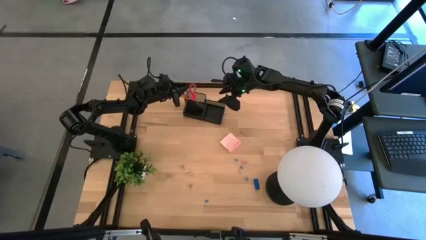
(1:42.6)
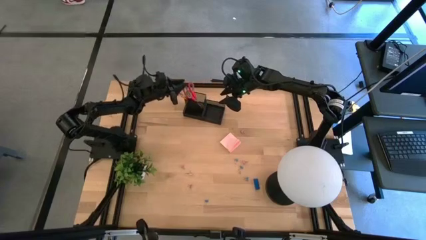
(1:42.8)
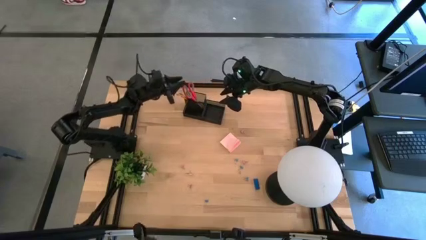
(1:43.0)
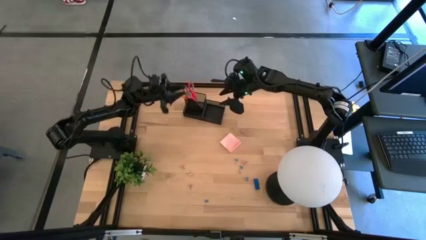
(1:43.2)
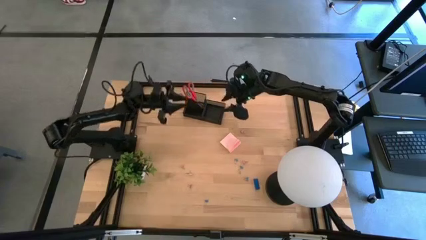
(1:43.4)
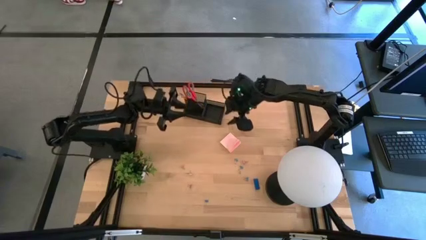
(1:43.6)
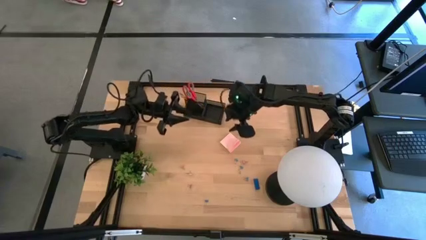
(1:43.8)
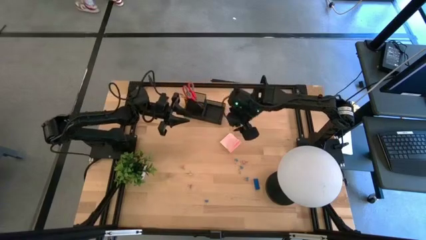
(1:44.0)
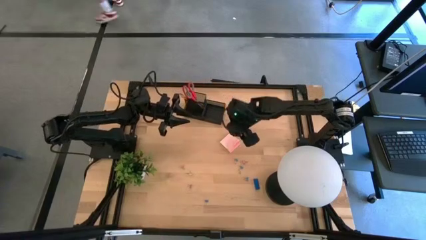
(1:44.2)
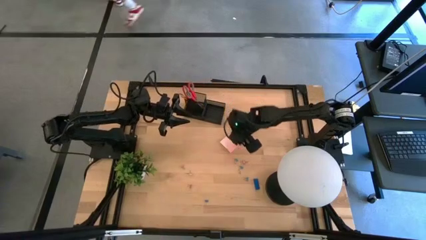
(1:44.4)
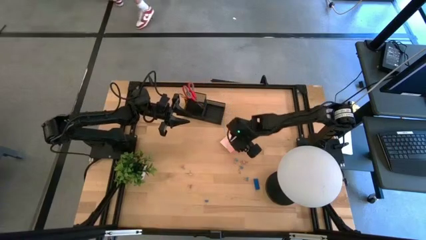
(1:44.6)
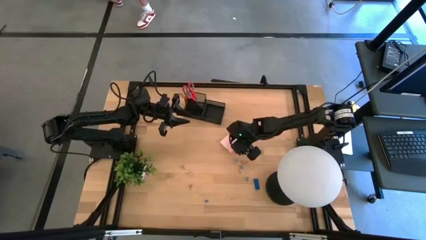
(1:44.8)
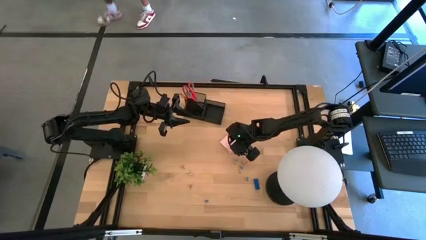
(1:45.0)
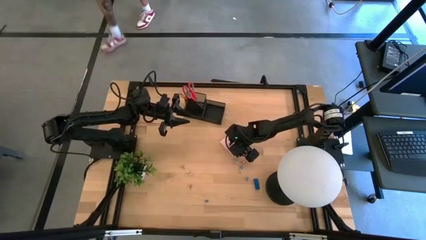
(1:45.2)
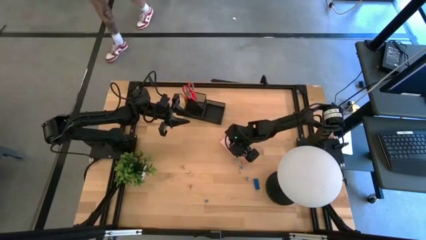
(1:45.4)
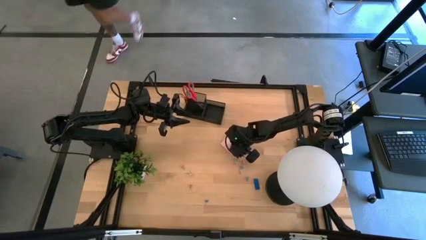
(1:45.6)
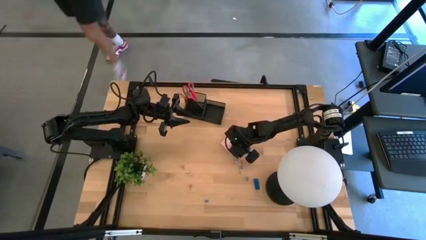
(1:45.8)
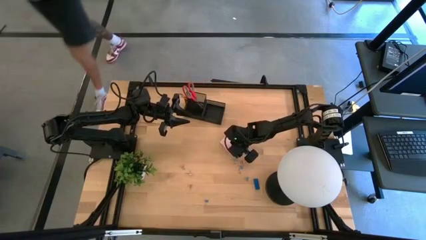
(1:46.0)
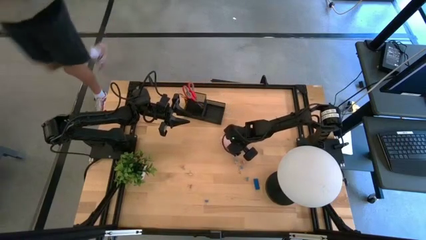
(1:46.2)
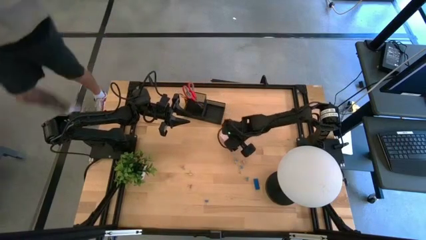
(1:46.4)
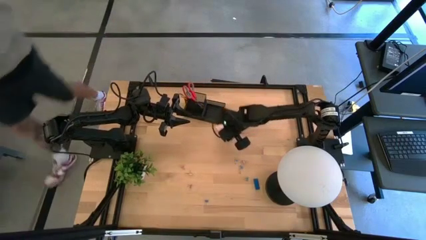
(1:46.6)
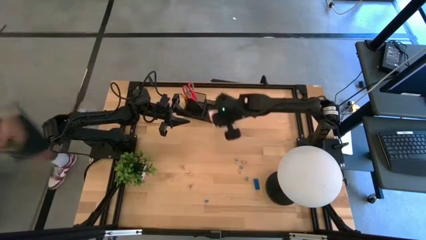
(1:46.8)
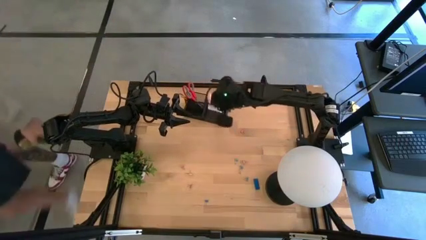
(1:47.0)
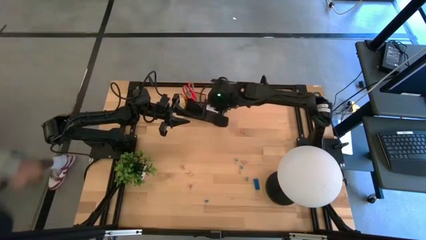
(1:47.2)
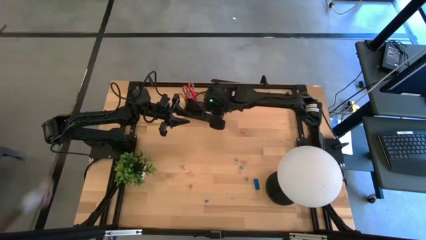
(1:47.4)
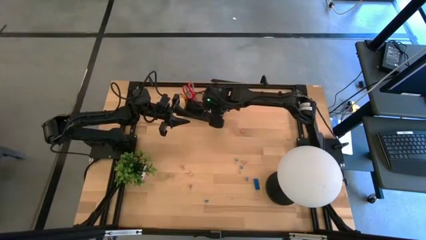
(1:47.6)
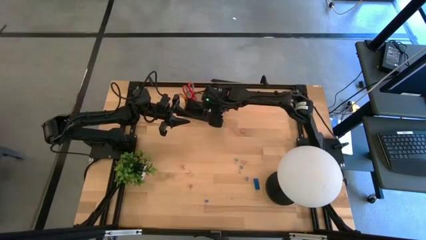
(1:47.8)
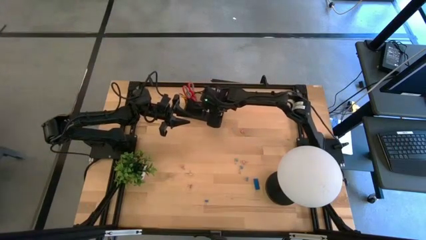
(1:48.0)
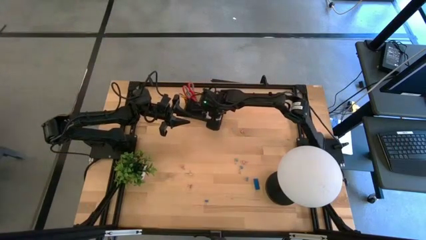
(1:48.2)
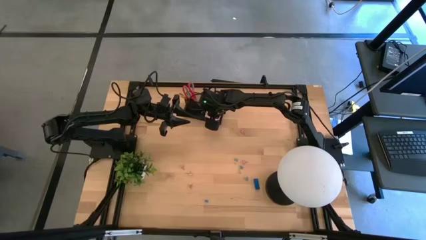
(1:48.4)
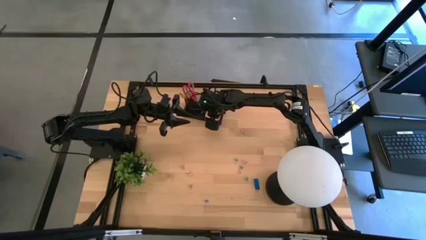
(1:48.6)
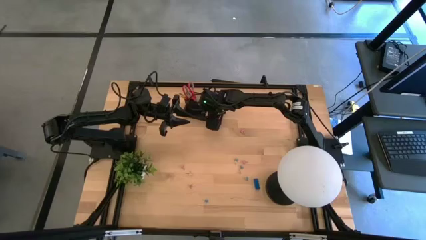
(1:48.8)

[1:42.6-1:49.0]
Task: Pick and place office supplies into organizer
Put the pink sticky notes into the black desk organizer

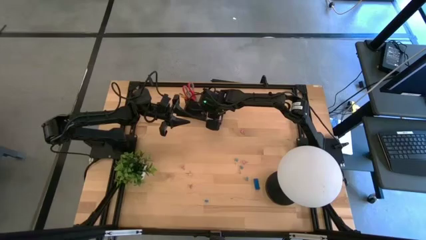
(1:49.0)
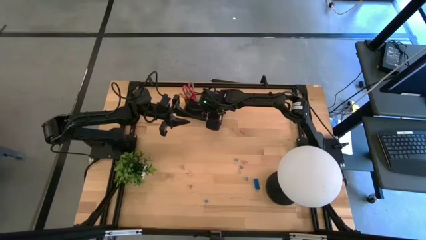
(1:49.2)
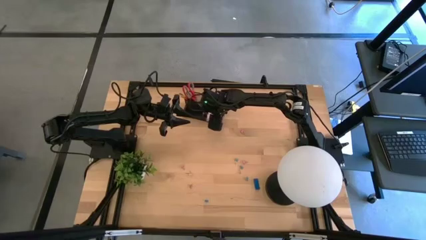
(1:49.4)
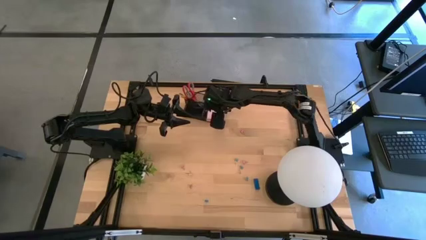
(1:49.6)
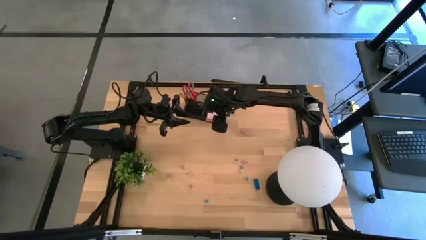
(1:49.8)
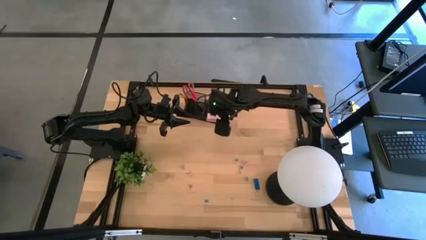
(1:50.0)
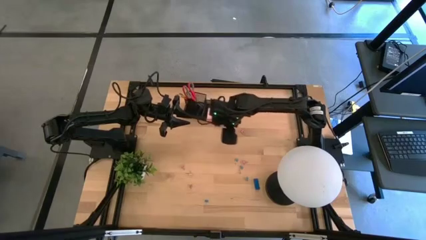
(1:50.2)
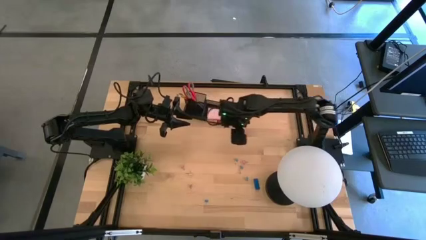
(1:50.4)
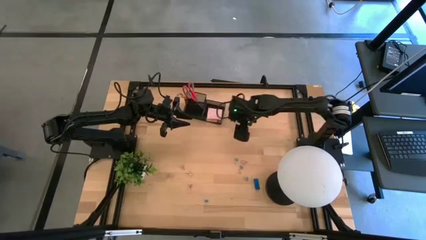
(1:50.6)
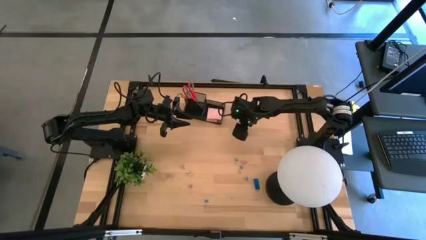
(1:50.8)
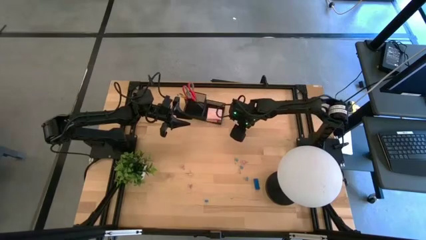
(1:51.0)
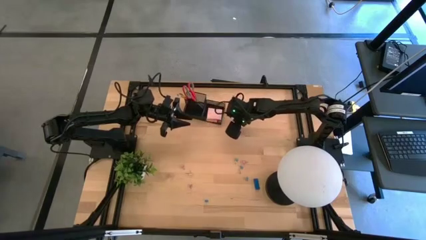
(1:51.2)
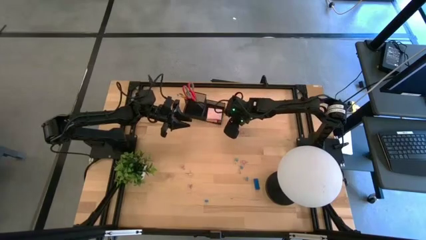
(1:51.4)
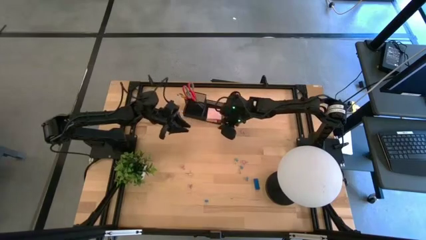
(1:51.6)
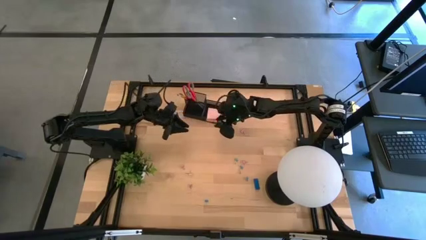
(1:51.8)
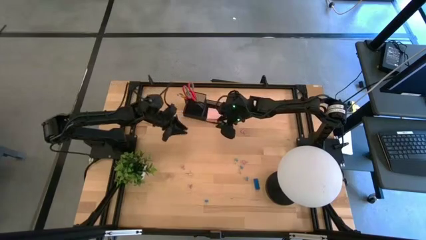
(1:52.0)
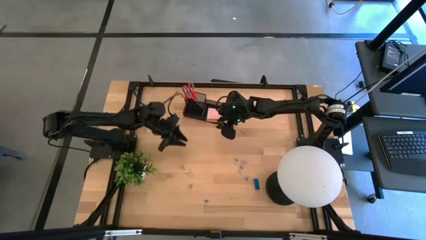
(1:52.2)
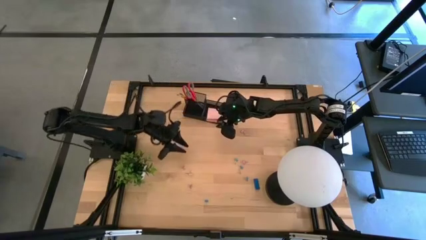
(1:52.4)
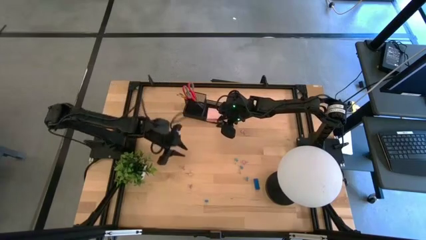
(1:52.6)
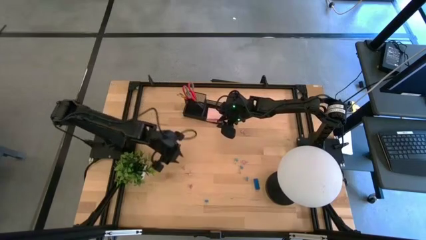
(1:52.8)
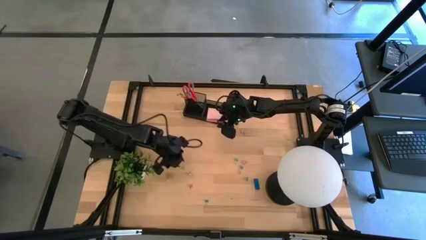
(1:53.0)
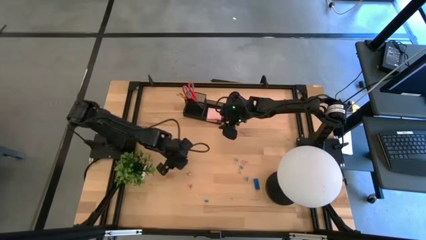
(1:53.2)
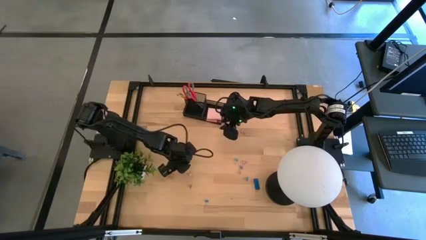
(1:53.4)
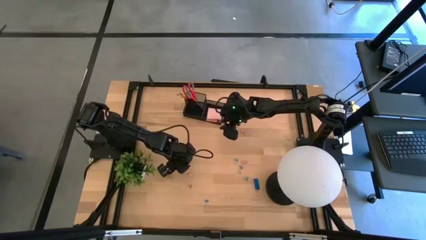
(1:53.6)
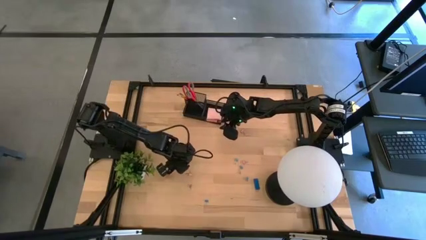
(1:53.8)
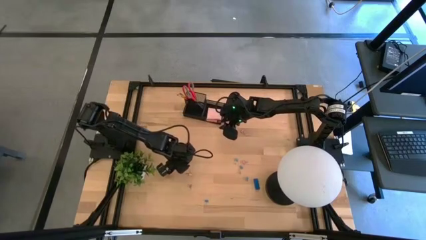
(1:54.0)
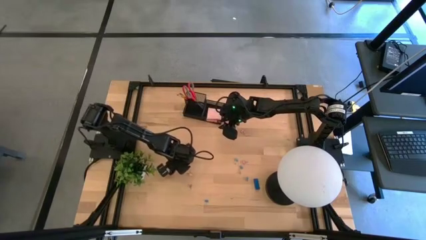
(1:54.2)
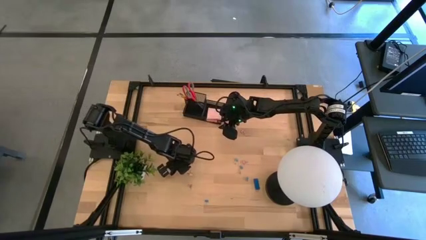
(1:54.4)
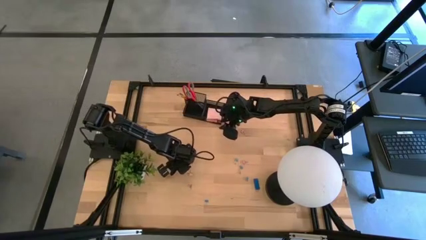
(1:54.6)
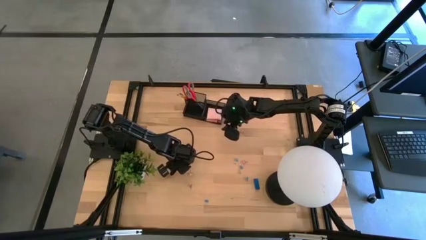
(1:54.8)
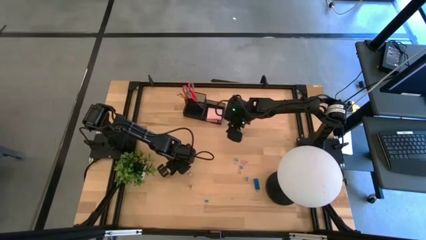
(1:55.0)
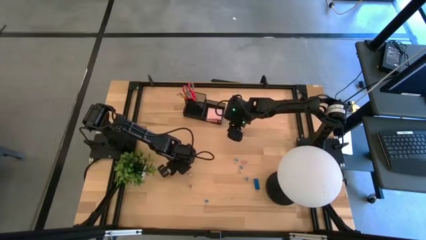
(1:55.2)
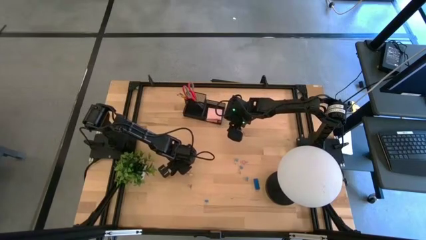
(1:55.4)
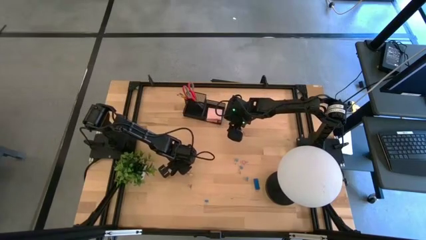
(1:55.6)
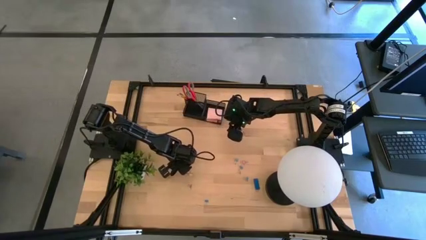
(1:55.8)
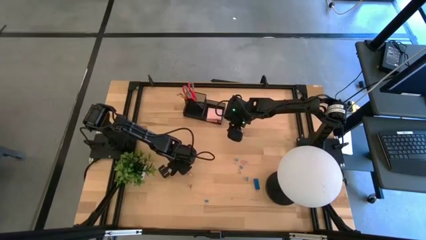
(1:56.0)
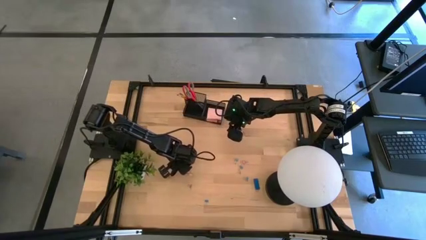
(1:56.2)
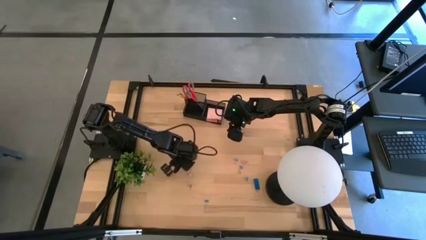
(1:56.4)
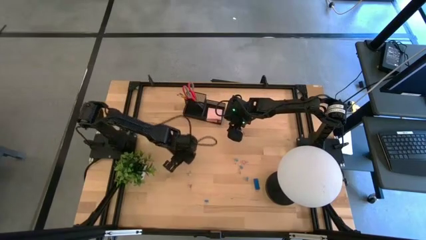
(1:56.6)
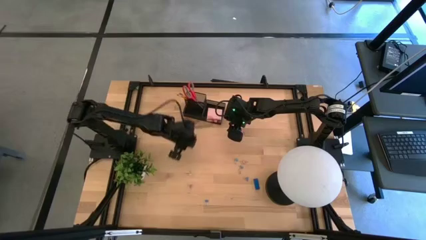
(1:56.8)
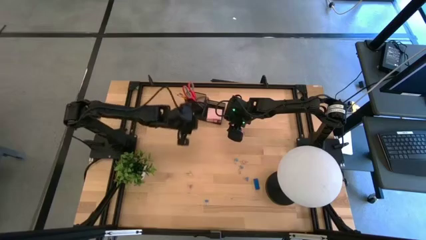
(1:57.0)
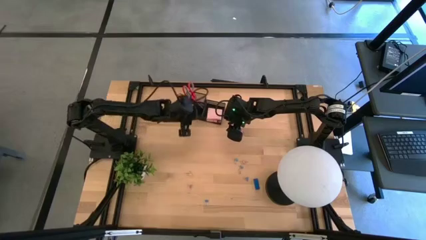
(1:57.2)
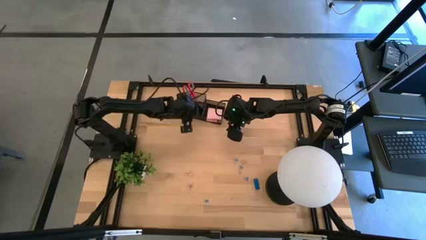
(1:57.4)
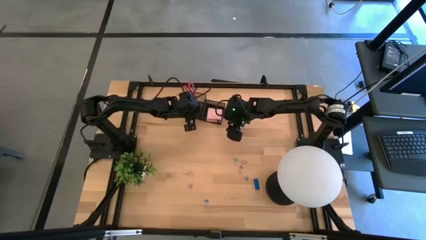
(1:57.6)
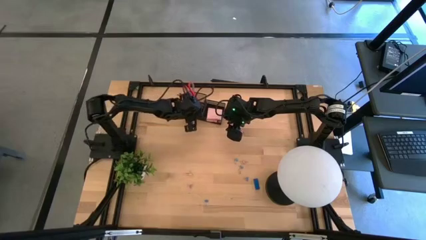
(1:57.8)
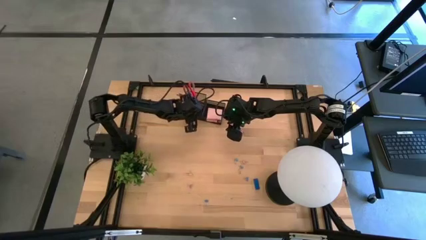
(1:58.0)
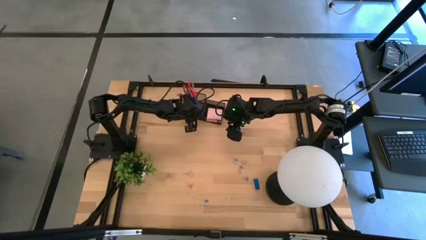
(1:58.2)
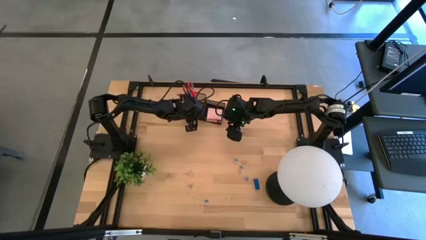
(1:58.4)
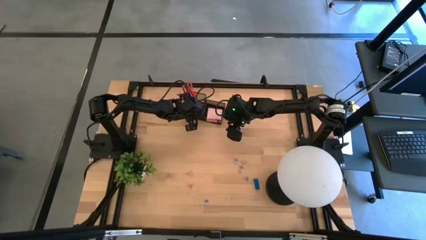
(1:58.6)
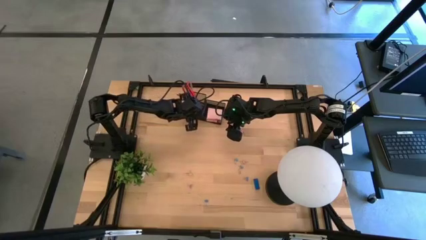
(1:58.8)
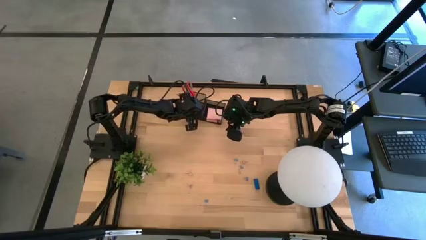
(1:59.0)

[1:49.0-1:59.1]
Put the pink binder clip into the black desk organizer
